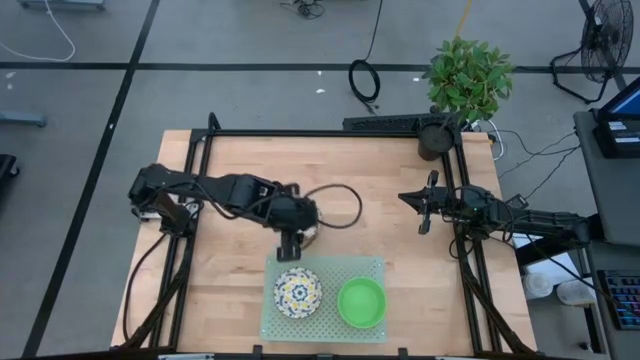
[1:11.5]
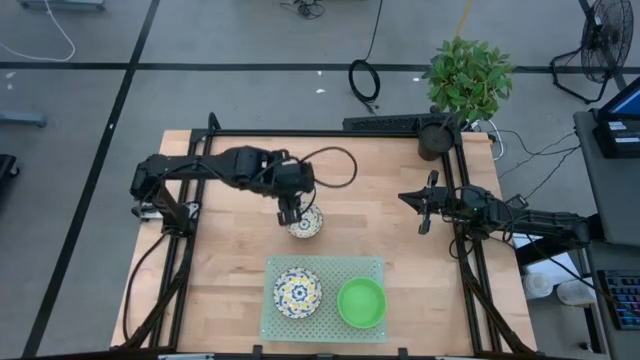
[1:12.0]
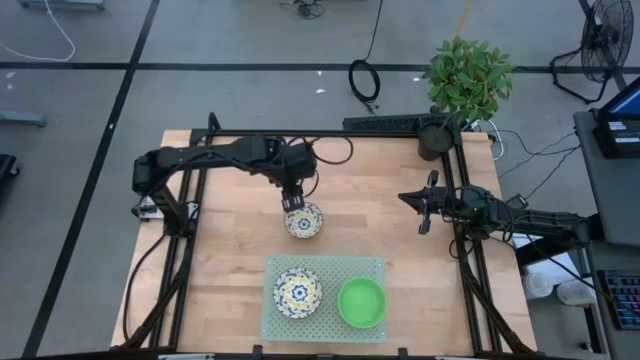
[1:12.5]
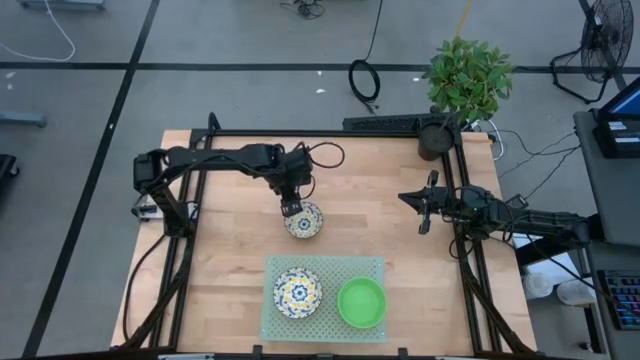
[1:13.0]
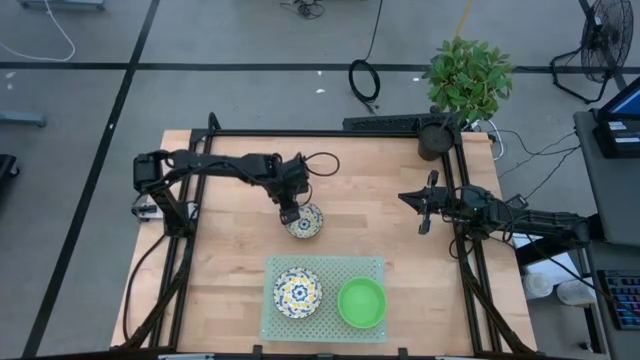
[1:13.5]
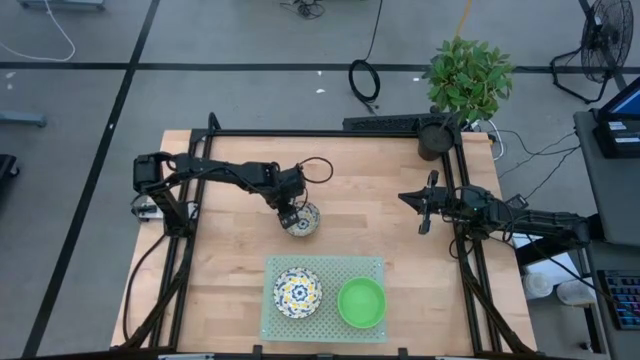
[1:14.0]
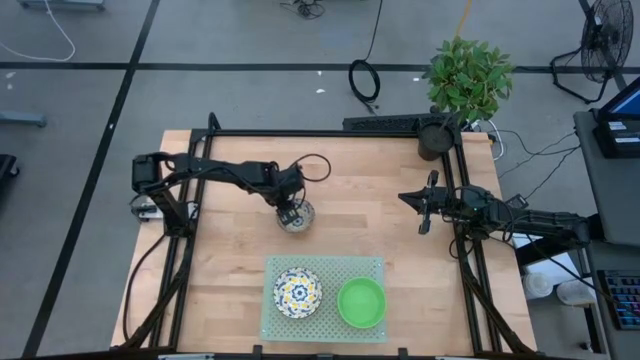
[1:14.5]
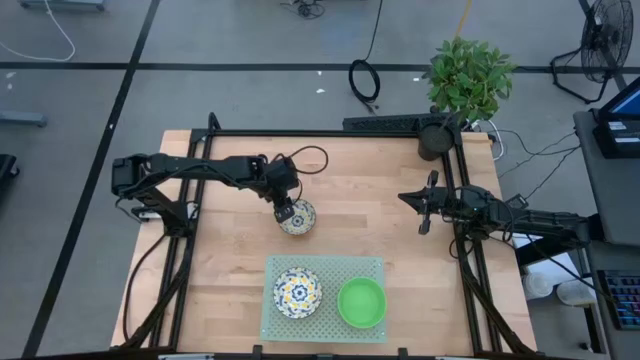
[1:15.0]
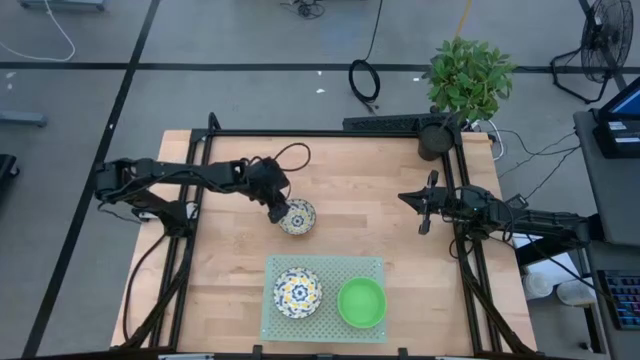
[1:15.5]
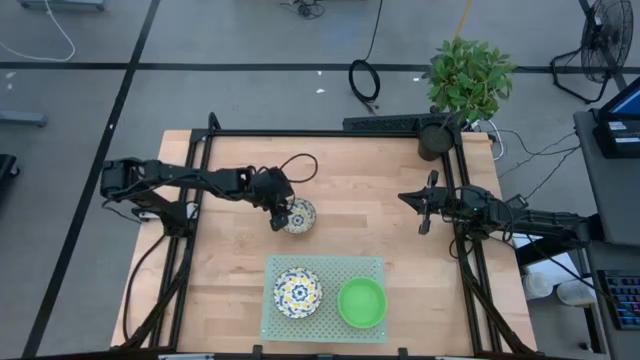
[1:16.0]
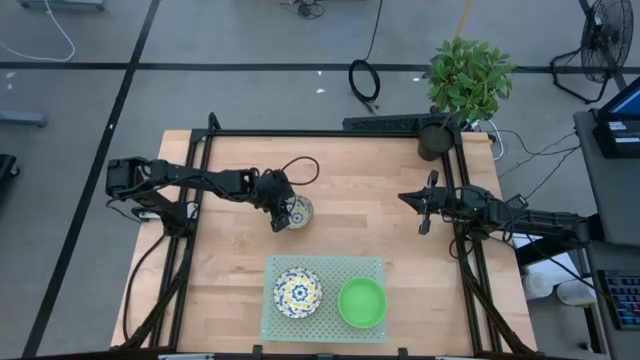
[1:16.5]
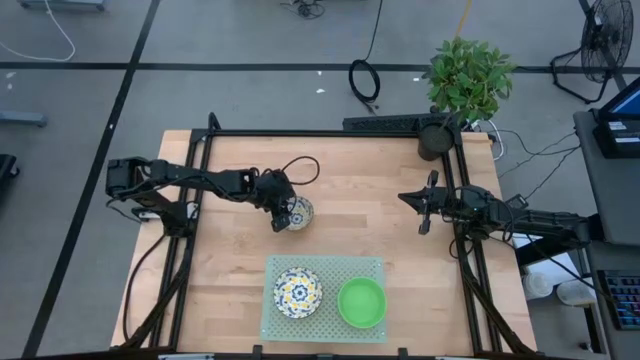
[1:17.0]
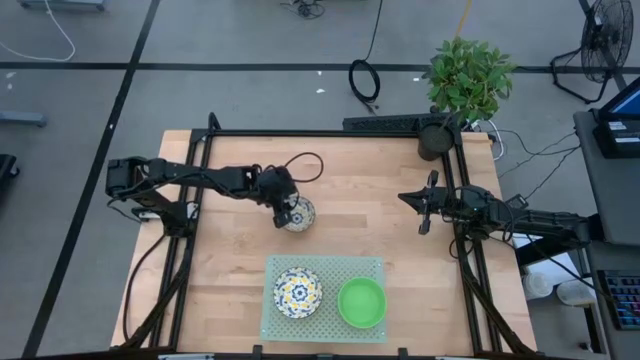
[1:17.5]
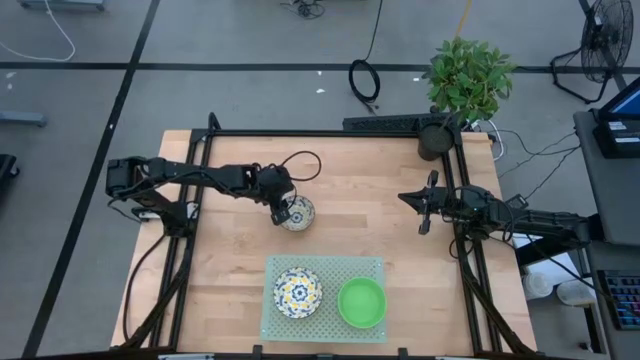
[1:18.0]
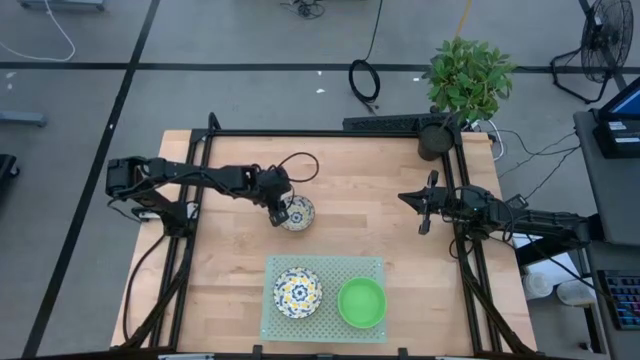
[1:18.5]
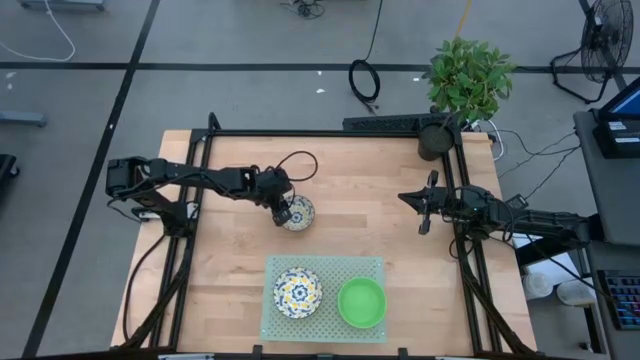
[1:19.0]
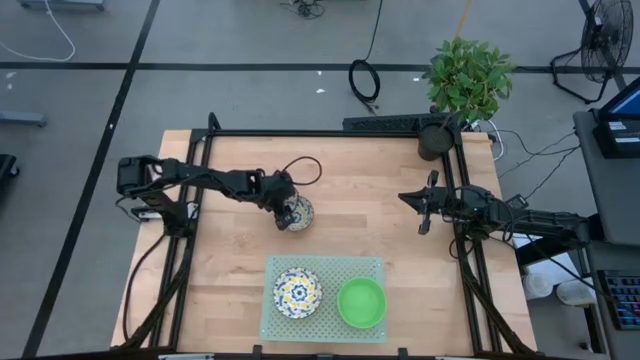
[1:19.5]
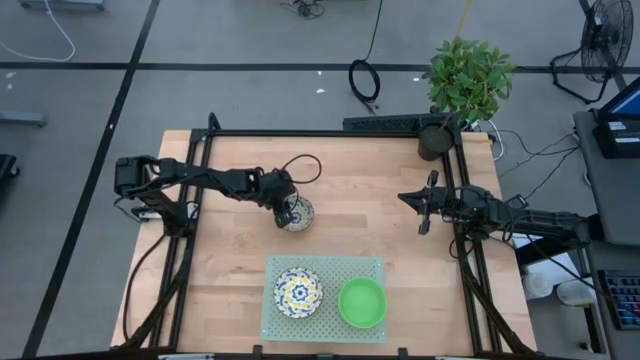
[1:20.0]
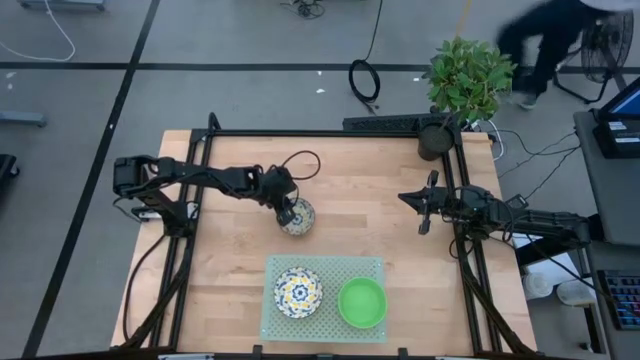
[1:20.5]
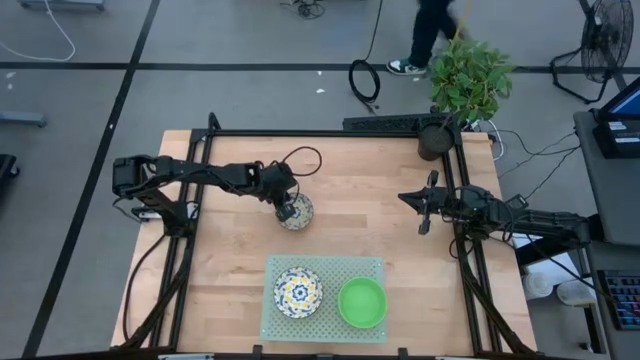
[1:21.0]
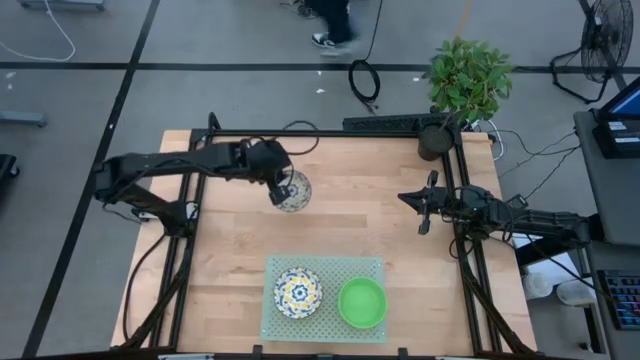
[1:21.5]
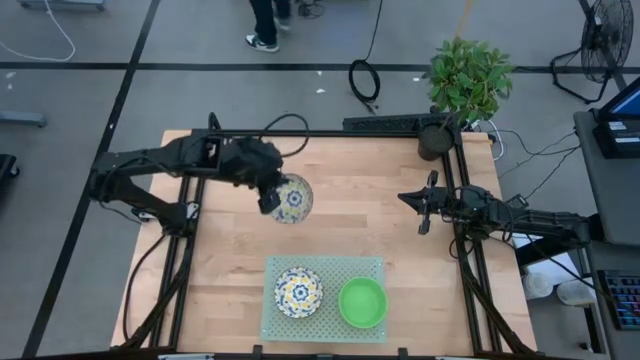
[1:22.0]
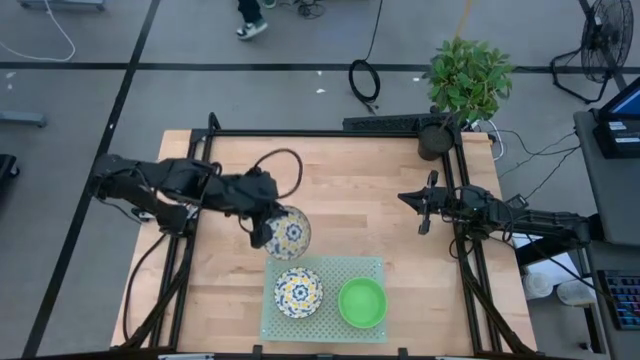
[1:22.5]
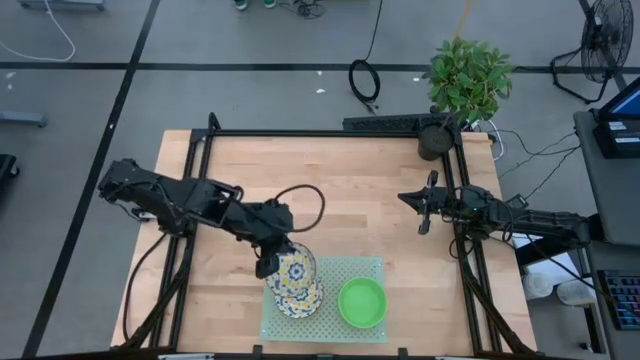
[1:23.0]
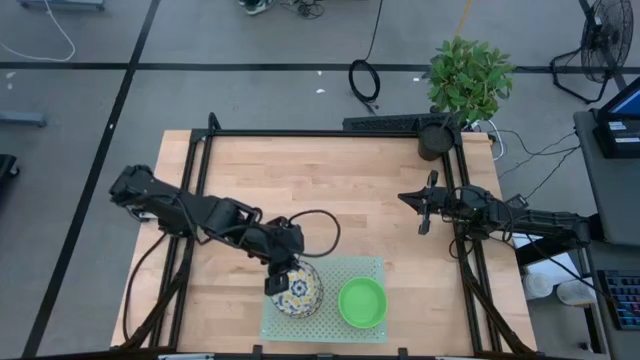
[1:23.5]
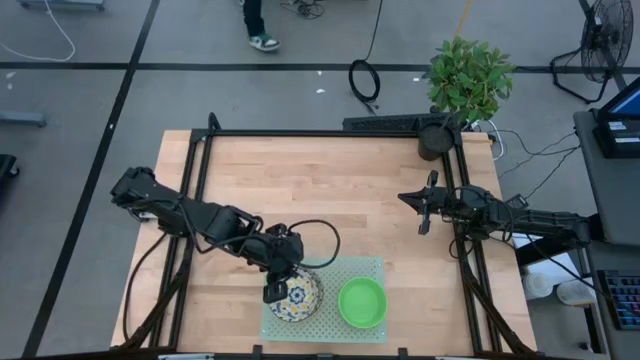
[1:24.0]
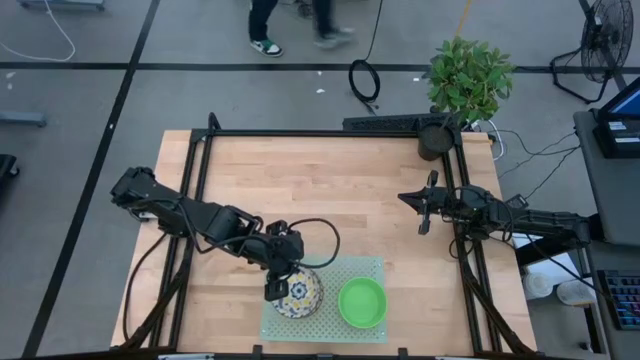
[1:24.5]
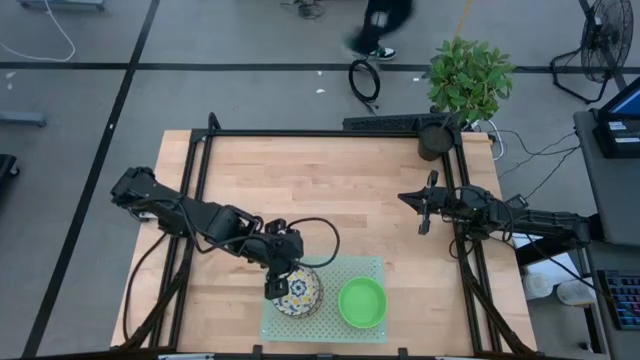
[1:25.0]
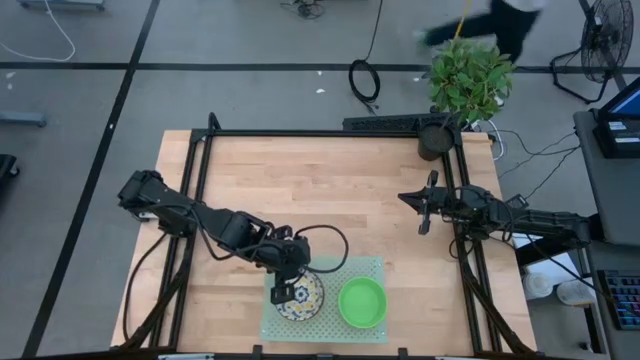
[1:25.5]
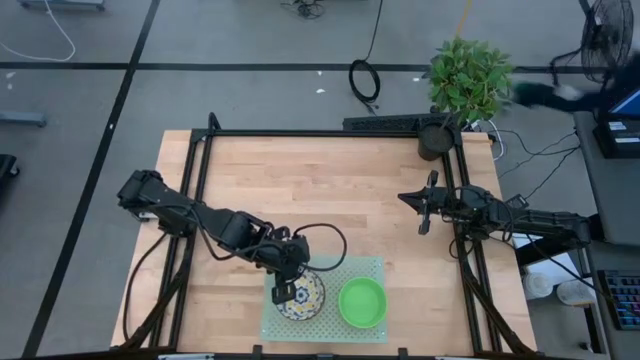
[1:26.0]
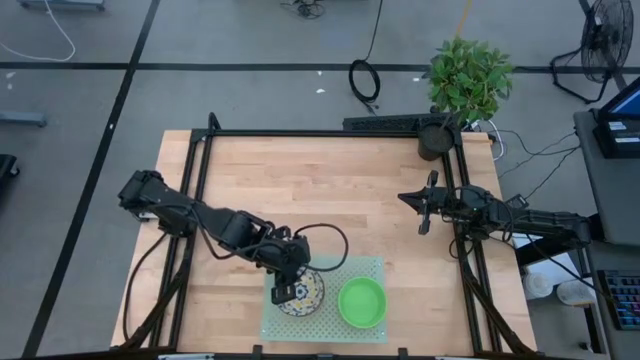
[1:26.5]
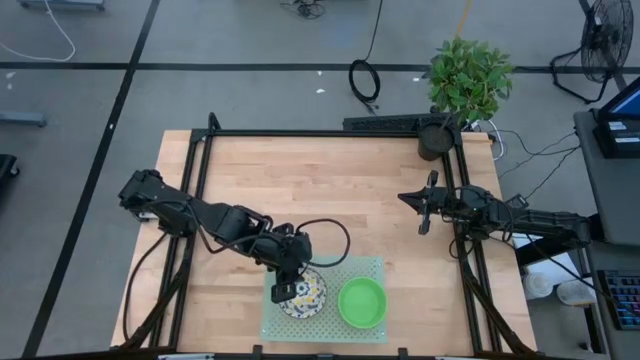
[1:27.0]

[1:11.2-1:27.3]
Task: Pick & Place Mini bowls
Stack the top yellow patterned bowl on the yellow patterned bowl on the shelf
